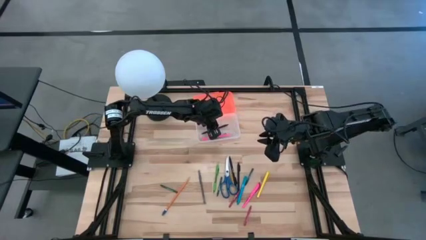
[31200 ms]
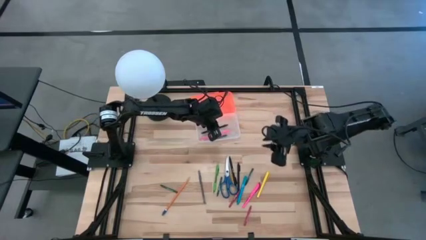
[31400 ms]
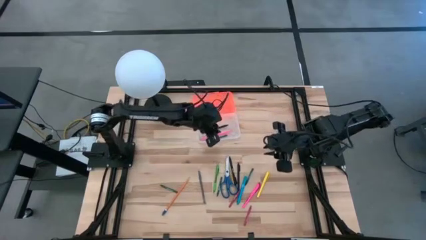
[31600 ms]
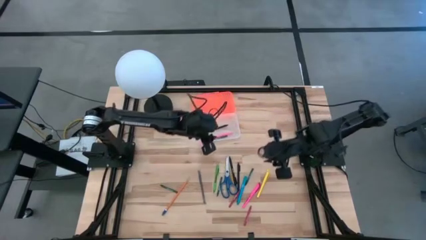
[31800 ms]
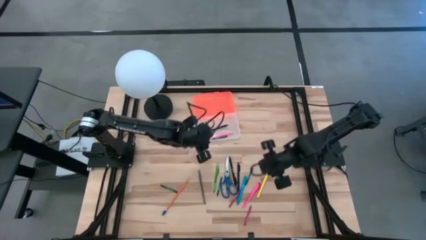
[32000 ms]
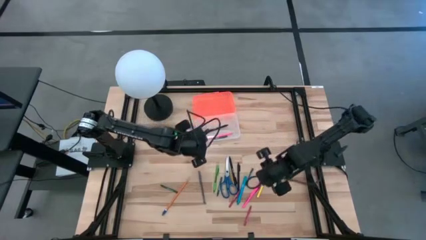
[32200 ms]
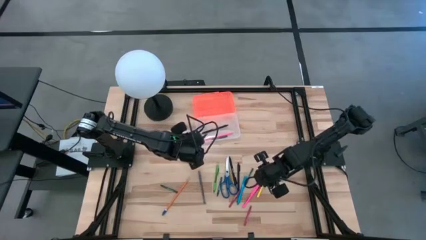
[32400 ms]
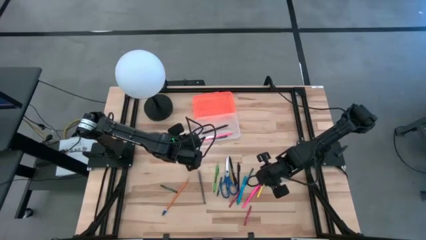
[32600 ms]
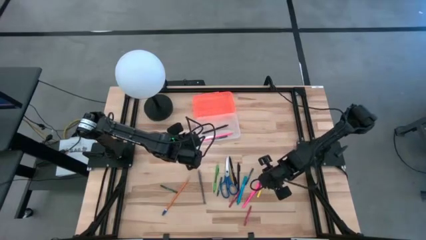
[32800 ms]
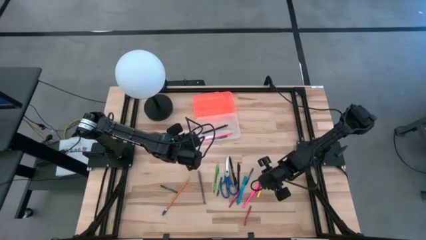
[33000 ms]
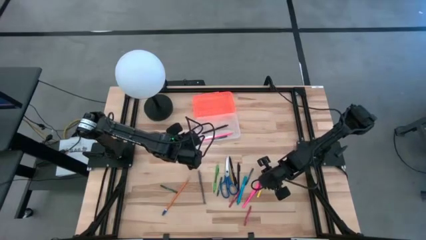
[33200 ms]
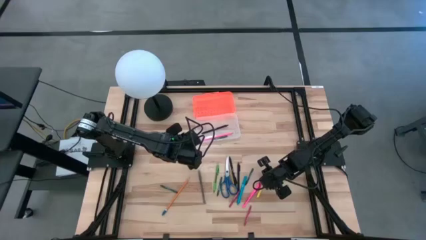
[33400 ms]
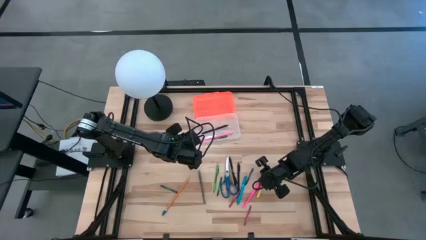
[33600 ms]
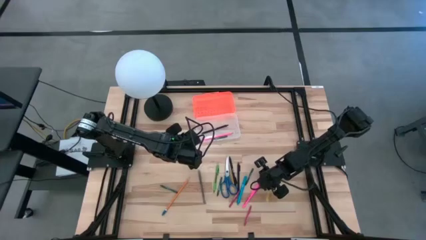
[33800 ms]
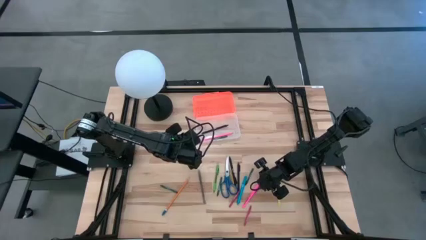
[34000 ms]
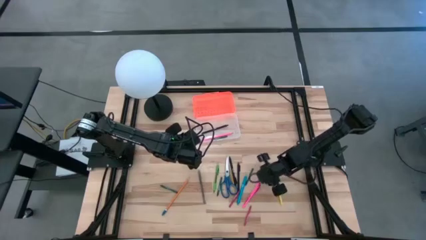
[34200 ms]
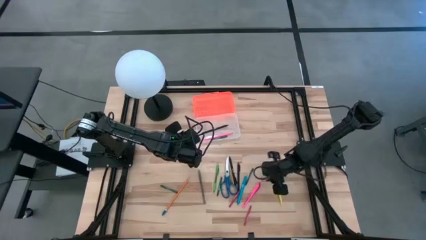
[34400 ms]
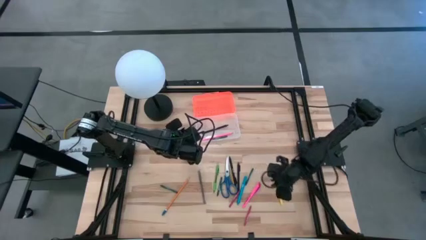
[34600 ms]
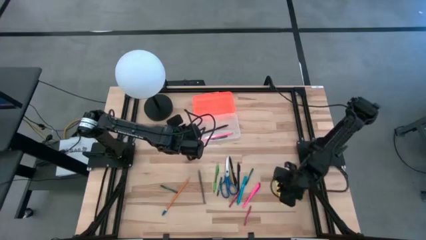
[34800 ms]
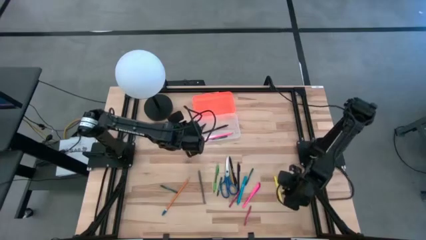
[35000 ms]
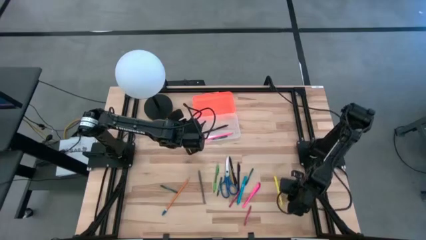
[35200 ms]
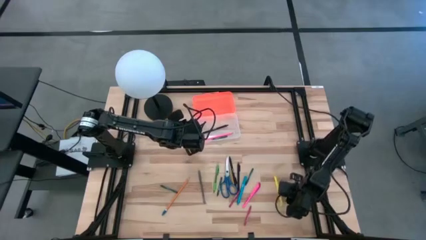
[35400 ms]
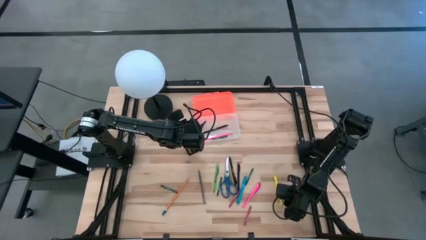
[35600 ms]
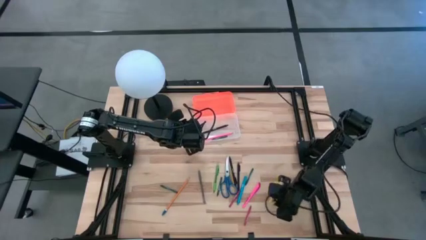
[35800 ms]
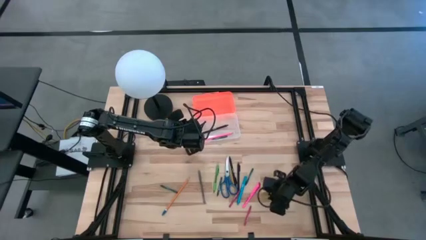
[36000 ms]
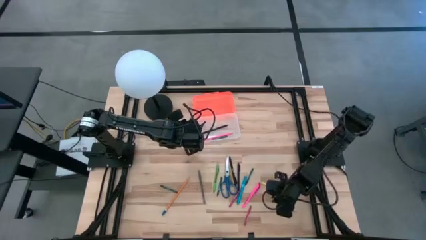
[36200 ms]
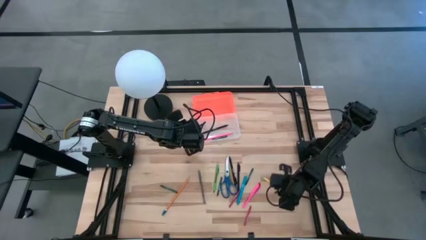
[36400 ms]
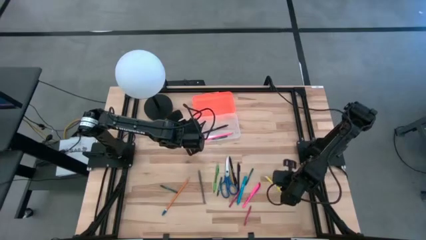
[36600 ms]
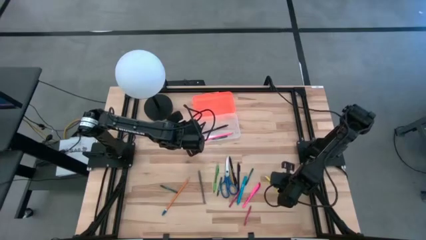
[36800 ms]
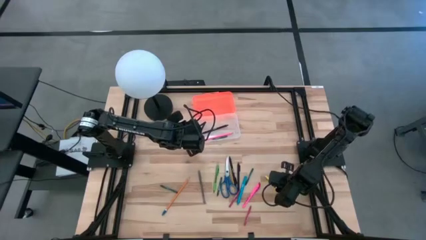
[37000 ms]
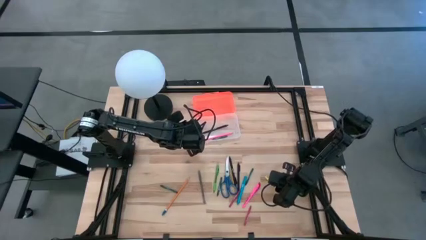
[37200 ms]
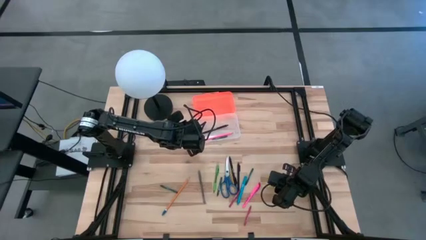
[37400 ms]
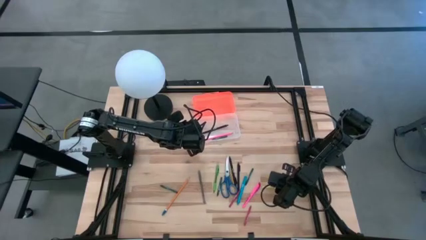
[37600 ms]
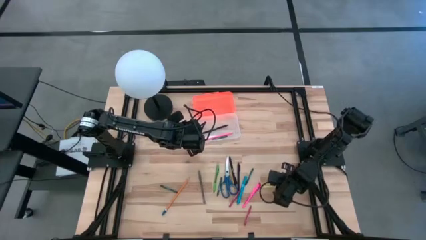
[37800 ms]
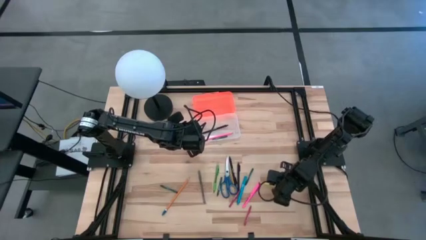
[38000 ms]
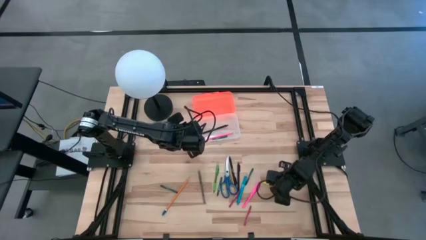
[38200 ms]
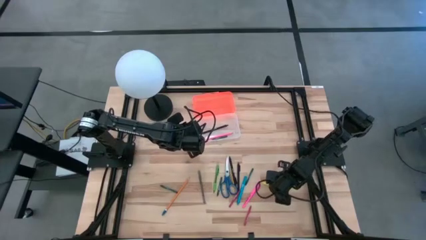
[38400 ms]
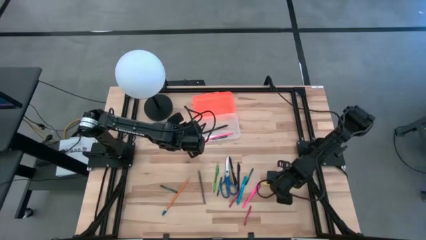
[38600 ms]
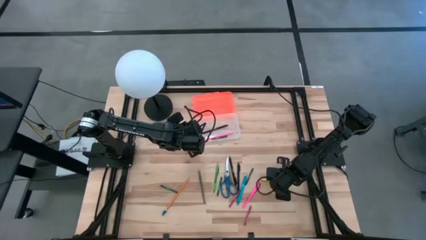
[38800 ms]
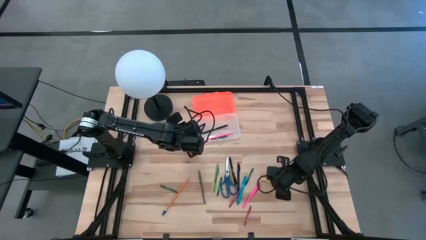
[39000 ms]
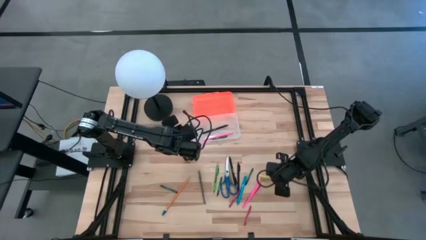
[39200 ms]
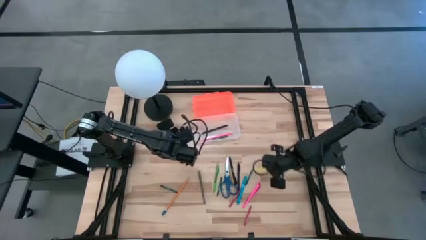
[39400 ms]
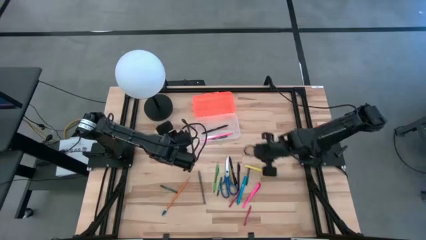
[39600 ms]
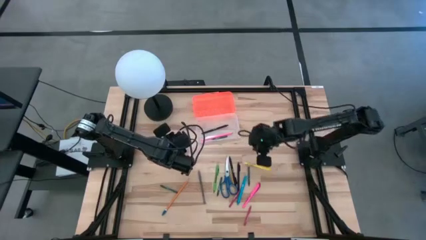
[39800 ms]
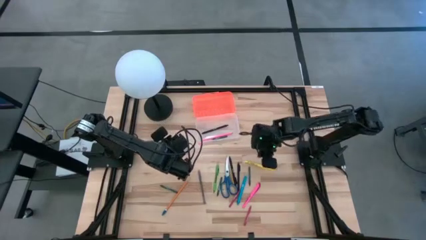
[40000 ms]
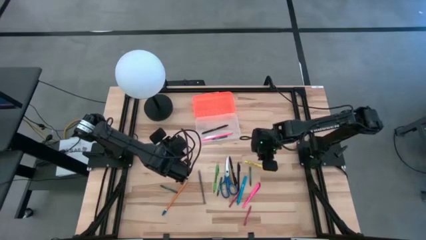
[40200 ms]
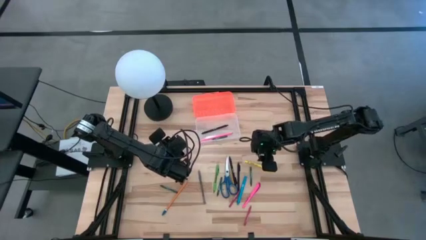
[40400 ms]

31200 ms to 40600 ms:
Task: Pick & place school supplies into a supply box
Put the yellow pen into the supply box

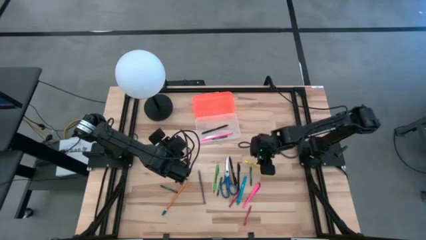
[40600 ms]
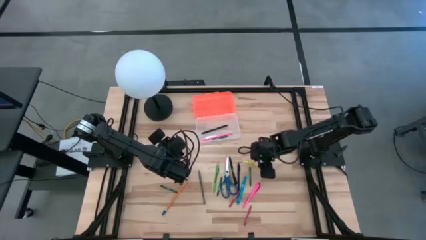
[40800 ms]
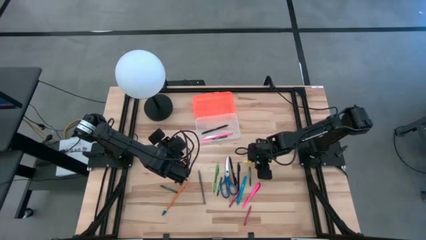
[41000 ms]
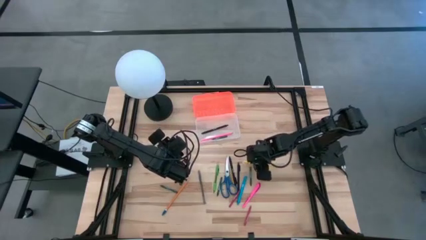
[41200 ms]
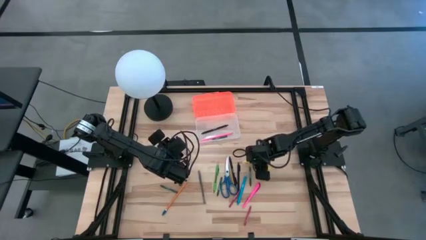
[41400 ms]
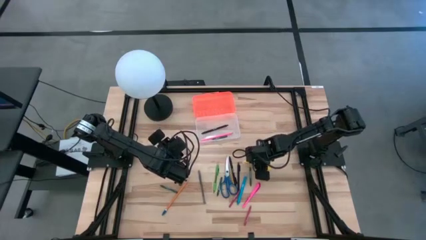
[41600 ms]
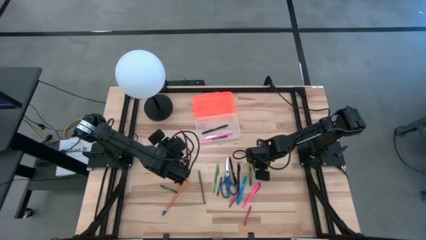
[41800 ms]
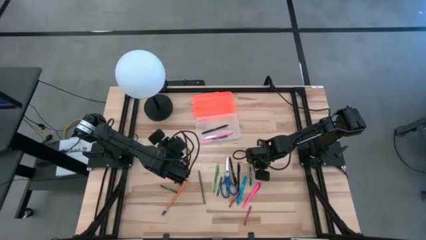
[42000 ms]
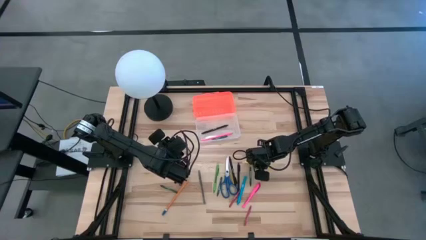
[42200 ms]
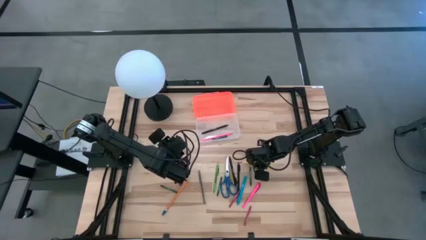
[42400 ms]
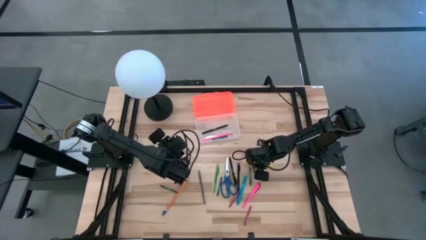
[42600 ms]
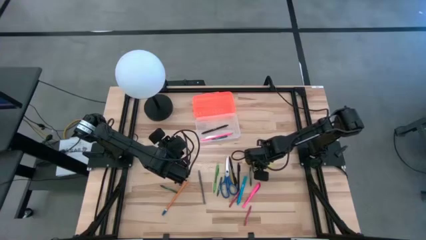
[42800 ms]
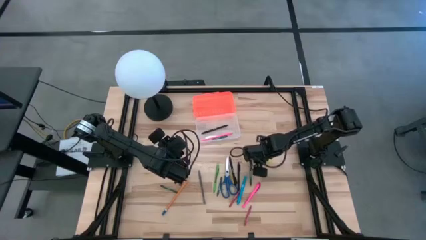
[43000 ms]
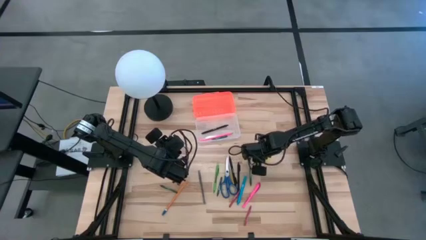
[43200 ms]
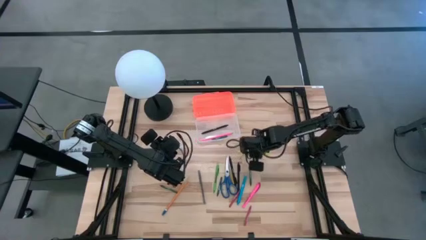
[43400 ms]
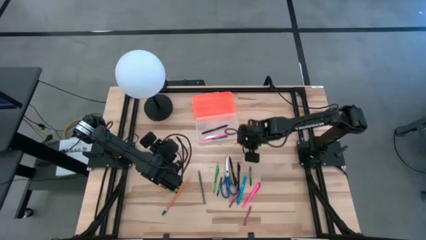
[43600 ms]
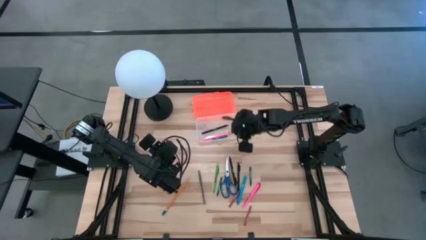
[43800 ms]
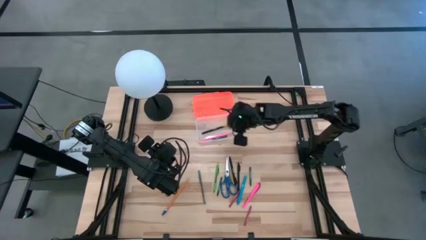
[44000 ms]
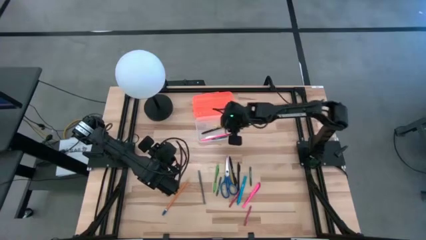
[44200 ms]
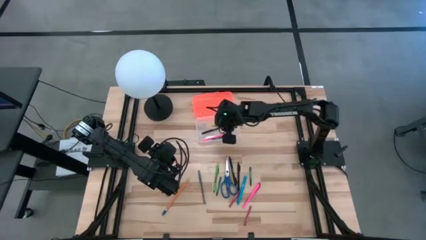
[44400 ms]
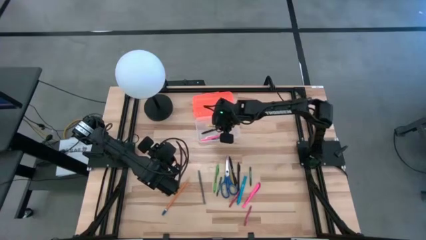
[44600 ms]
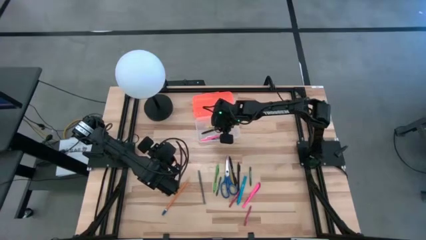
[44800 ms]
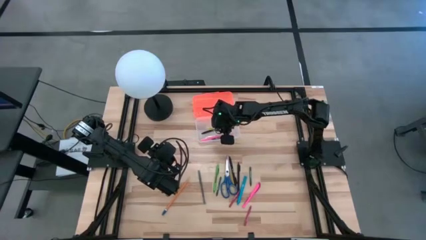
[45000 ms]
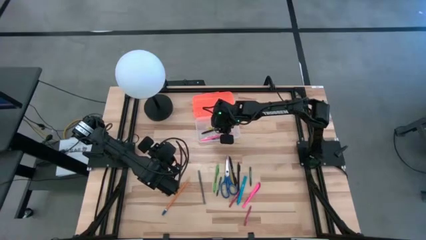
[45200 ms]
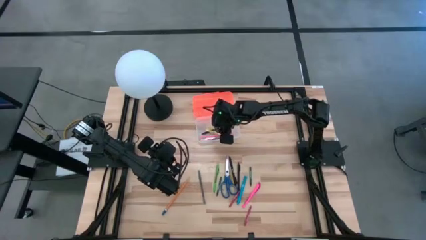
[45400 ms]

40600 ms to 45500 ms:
Put the yellow pen into the supply box
